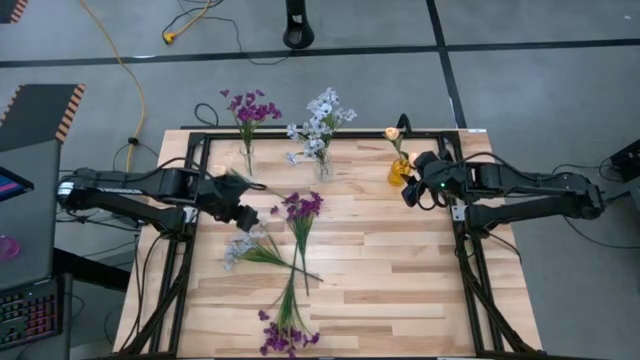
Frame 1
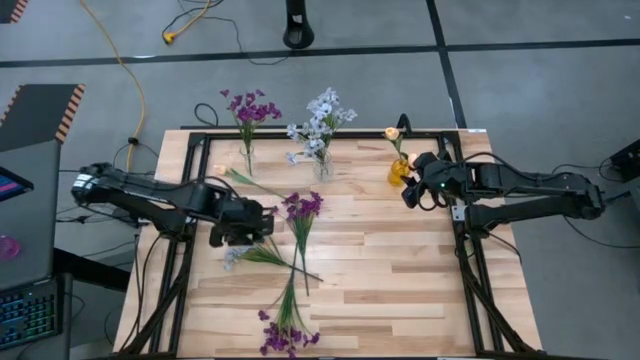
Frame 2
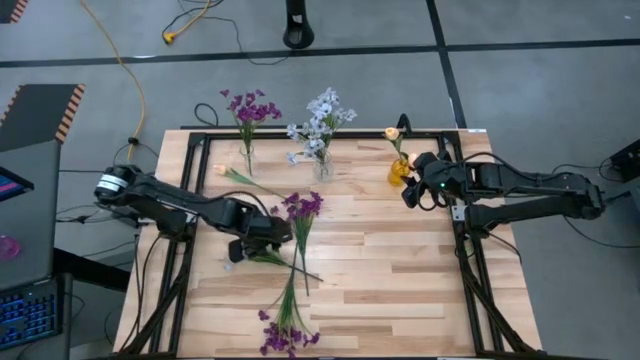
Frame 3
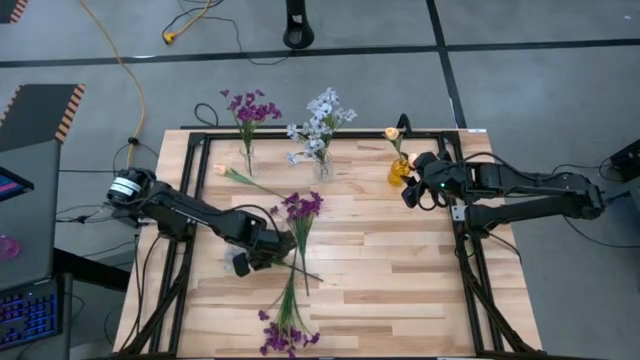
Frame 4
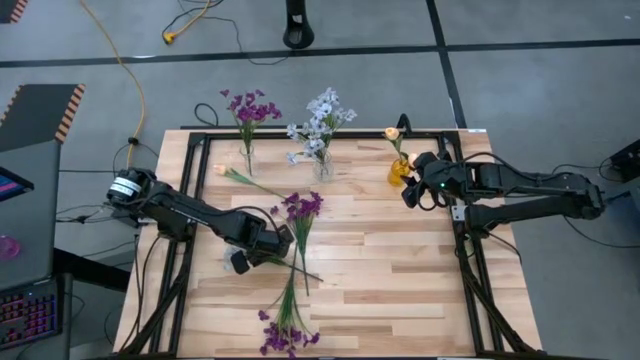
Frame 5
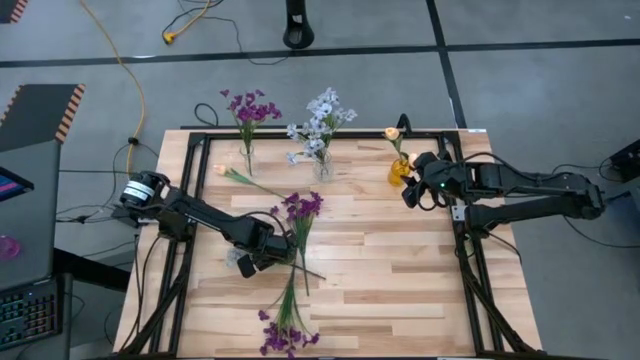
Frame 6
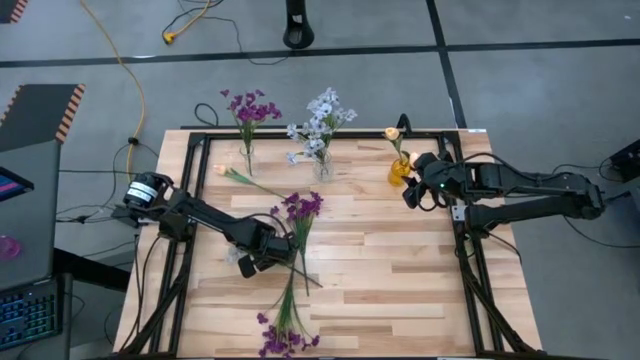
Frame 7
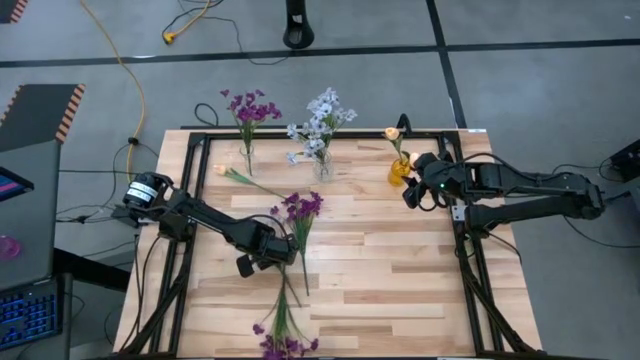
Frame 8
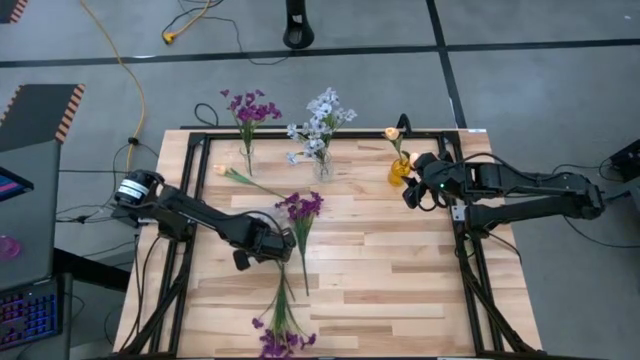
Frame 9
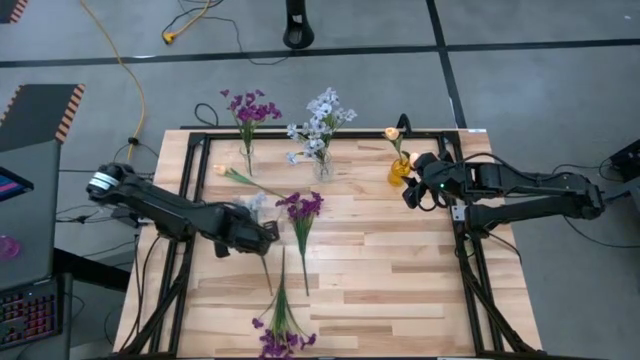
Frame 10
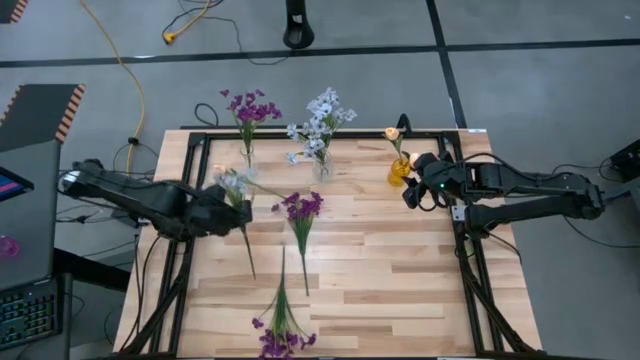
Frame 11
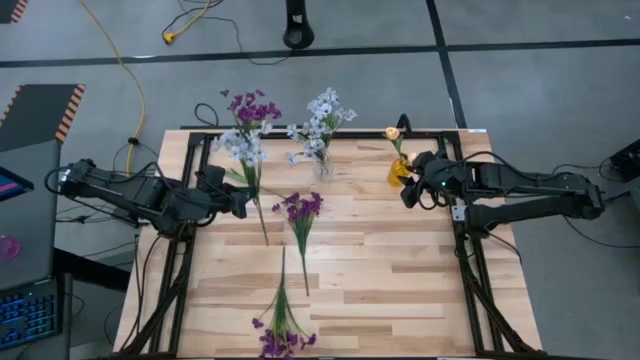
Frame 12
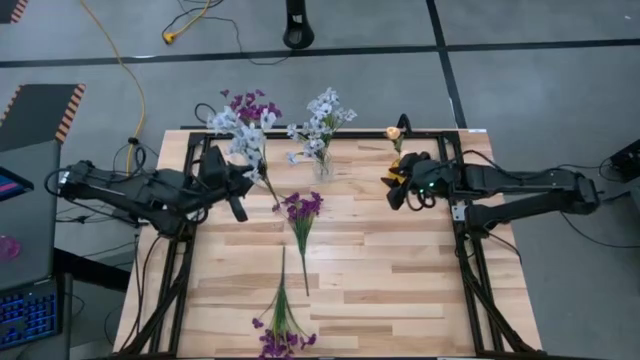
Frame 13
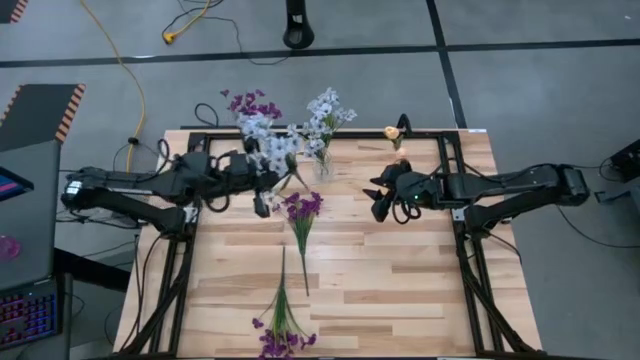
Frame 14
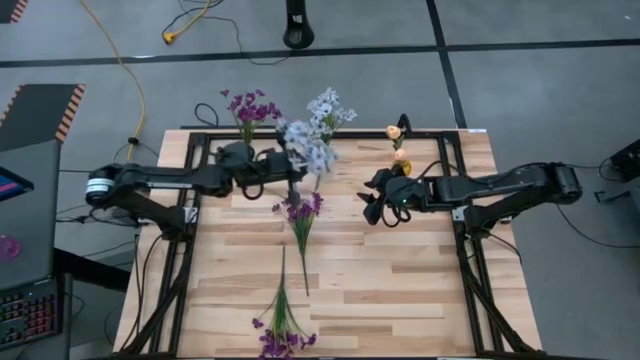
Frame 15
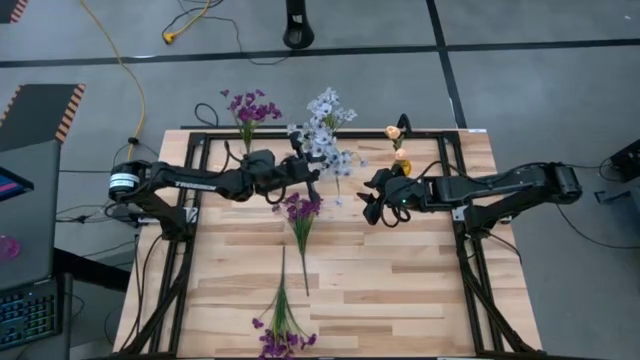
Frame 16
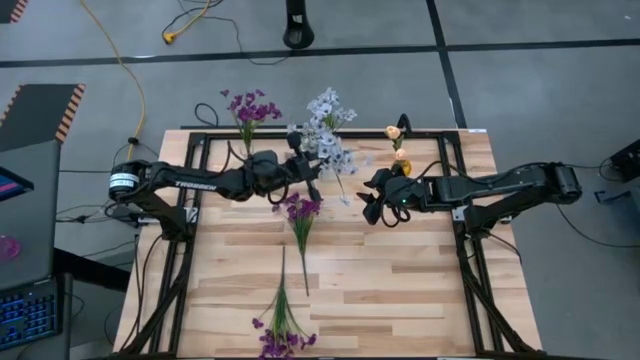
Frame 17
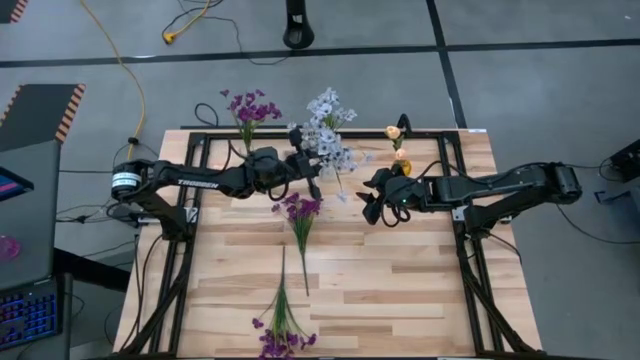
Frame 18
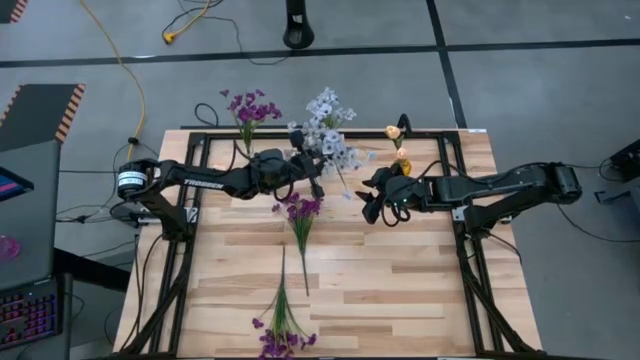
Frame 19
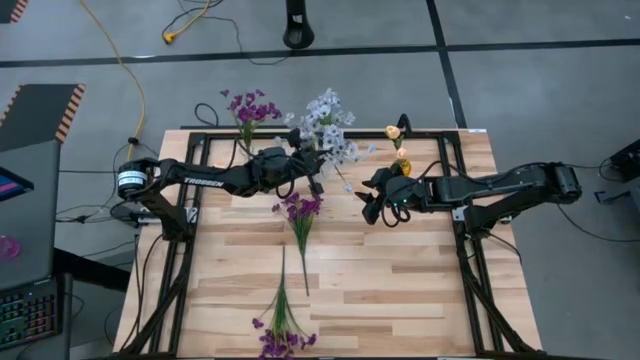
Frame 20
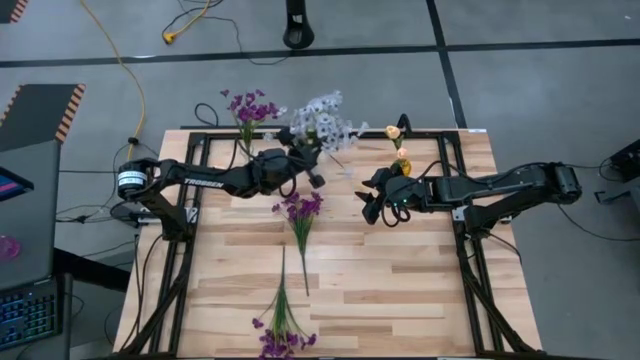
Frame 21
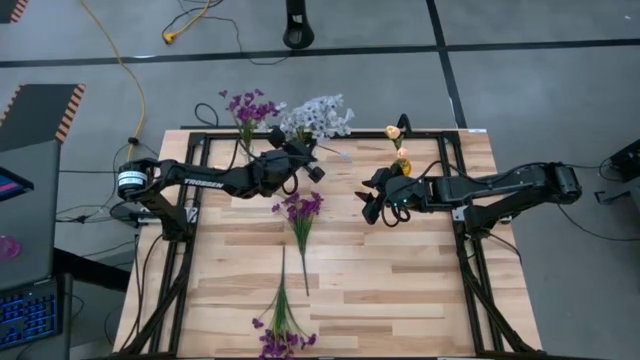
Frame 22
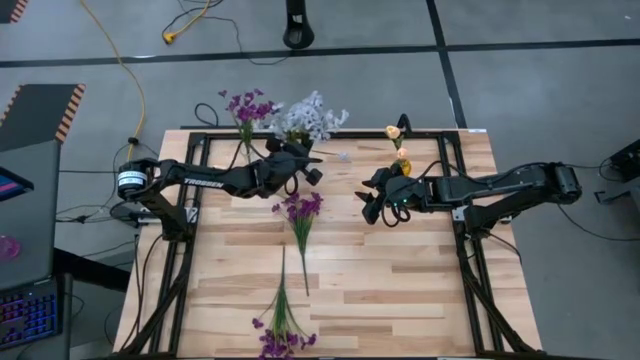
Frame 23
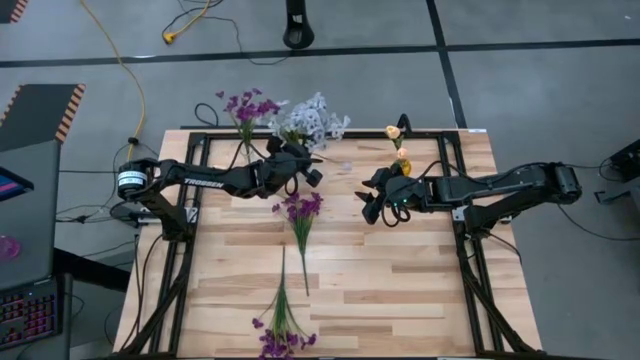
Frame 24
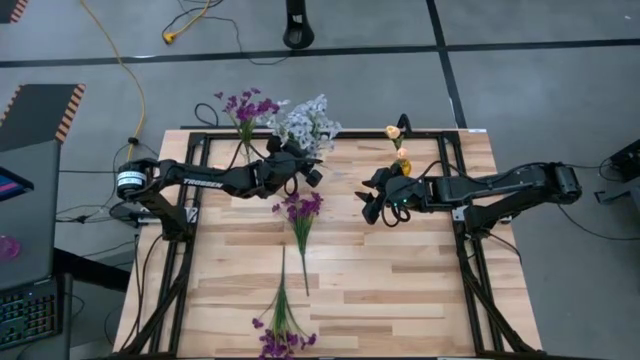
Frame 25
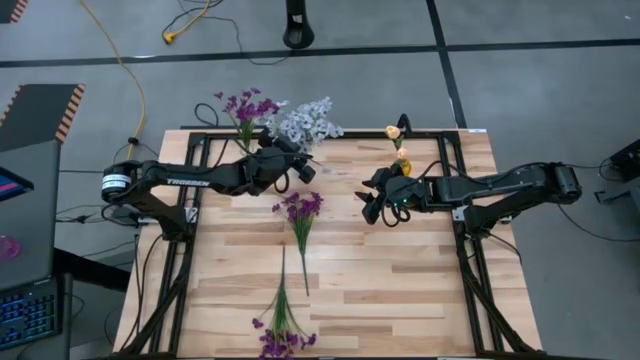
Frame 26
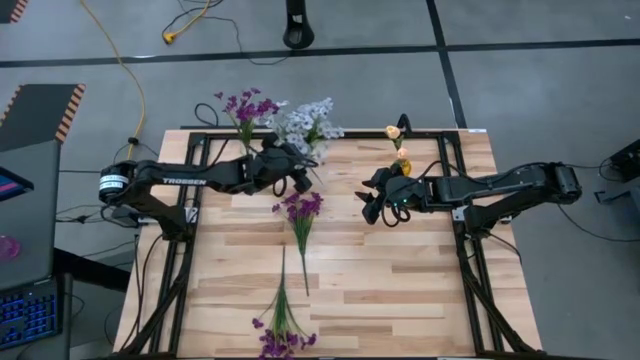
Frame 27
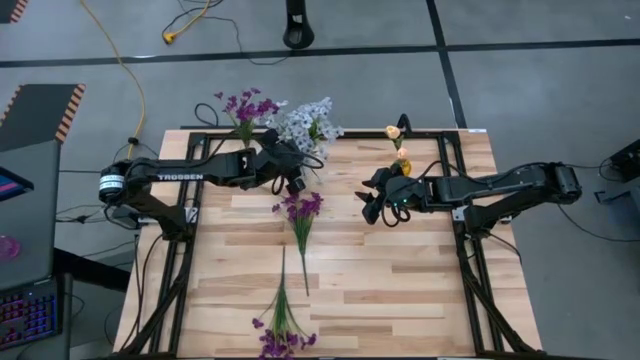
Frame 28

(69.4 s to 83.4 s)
Task: Sort flowers into vase by color
Put the left white flowers into the right transparent vase

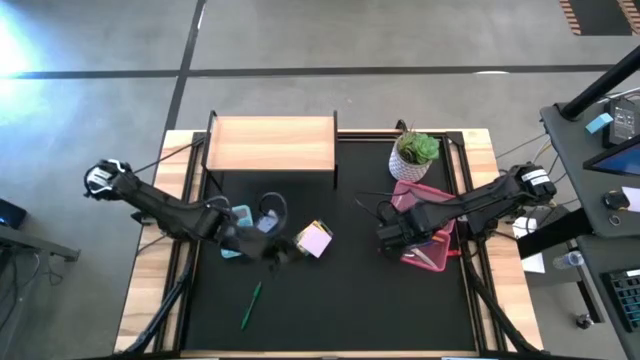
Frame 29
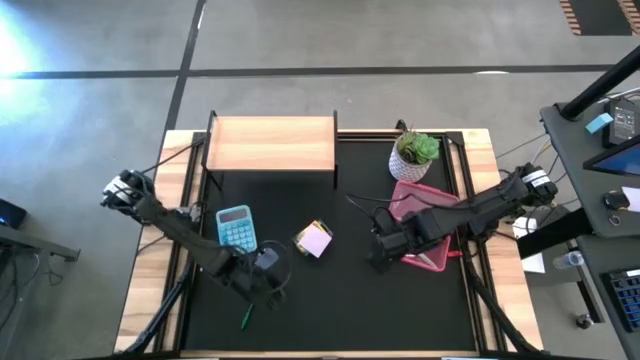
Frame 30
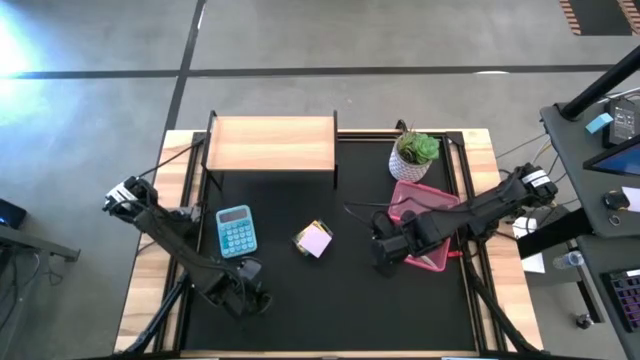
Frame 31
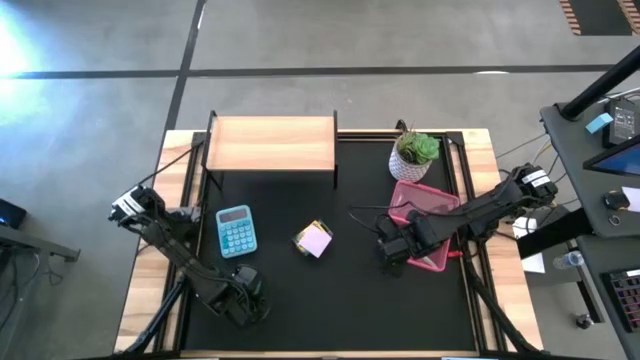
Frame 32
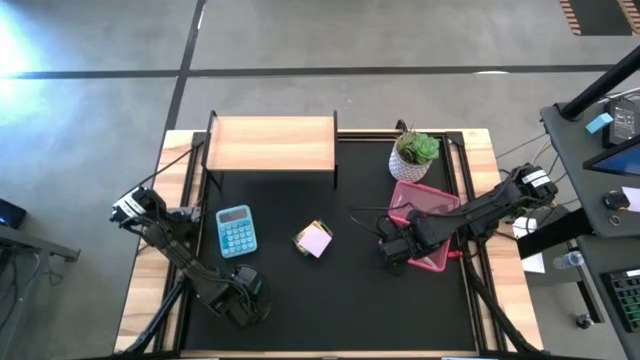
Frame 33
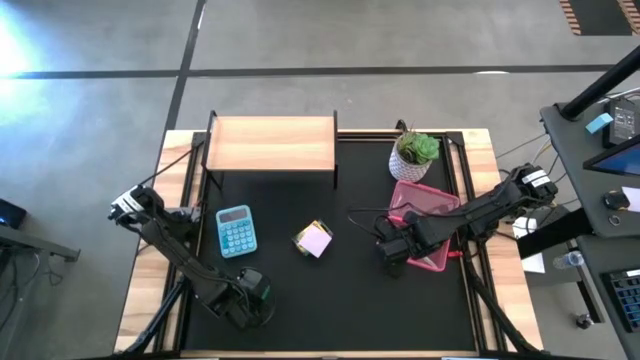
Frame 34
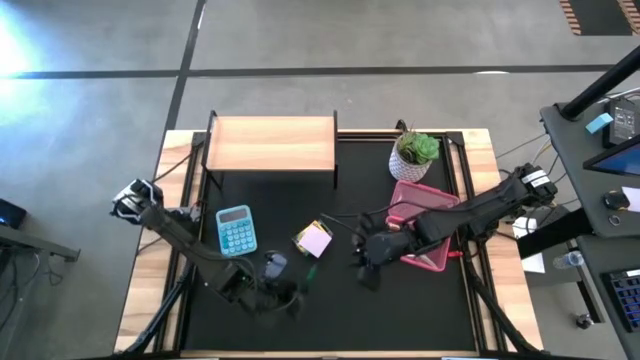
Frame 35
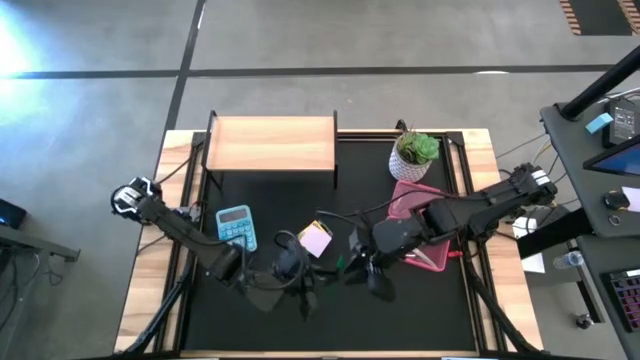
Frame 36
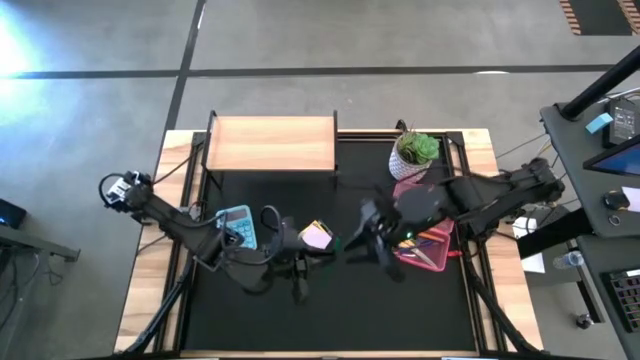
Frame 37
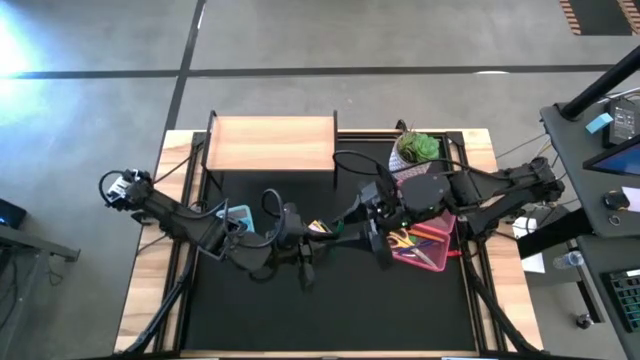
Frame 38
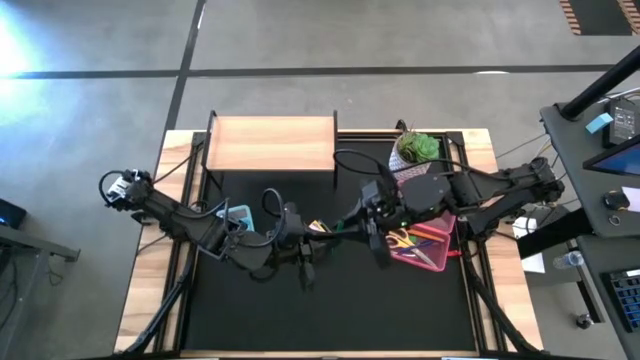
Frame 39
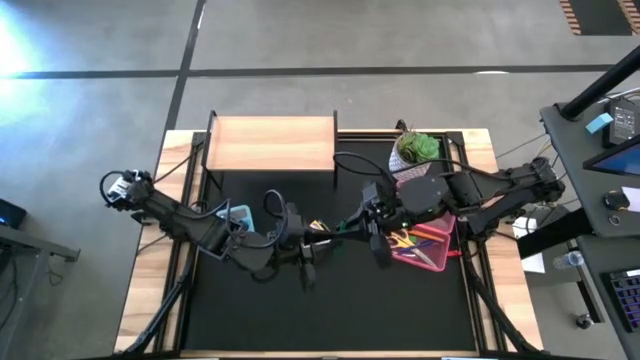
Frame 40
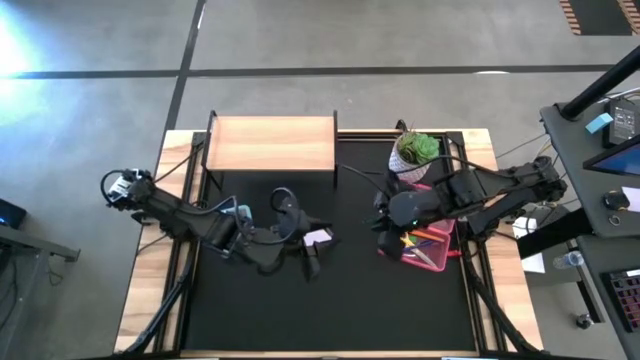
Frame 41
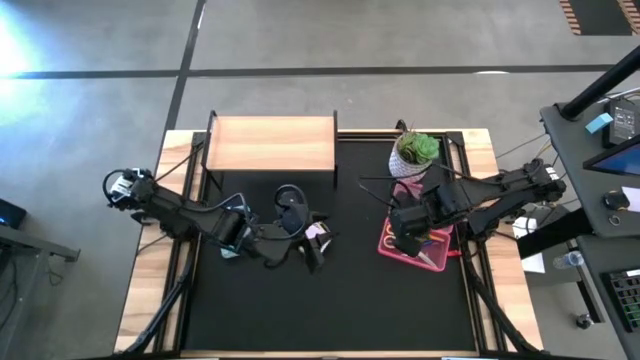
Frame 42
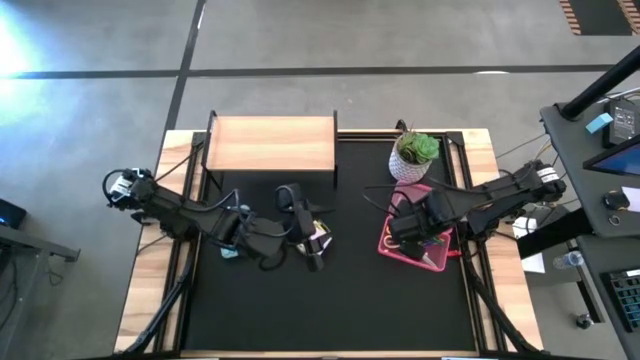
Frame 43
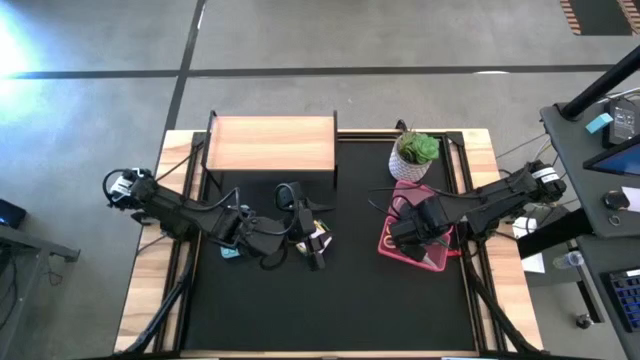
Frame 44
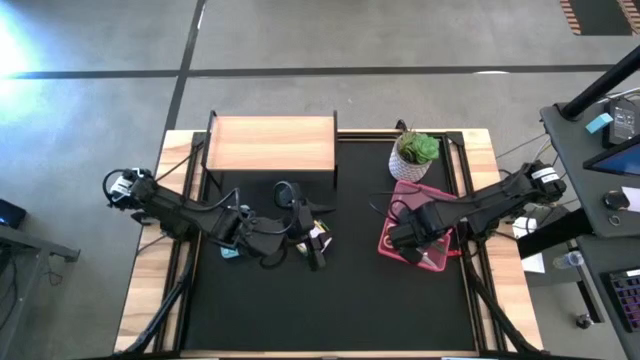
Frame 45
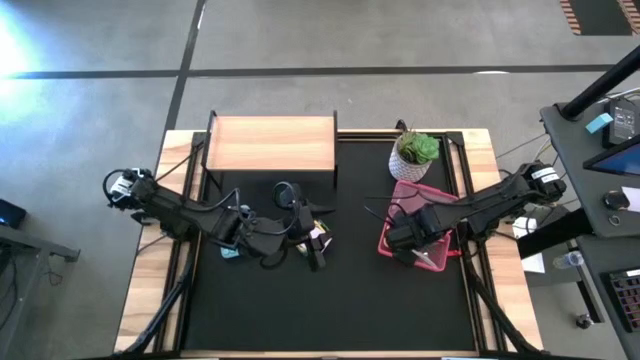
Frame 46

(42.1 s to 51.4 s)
Task: Pack school essentials
Put the green pen into the pink supply box
